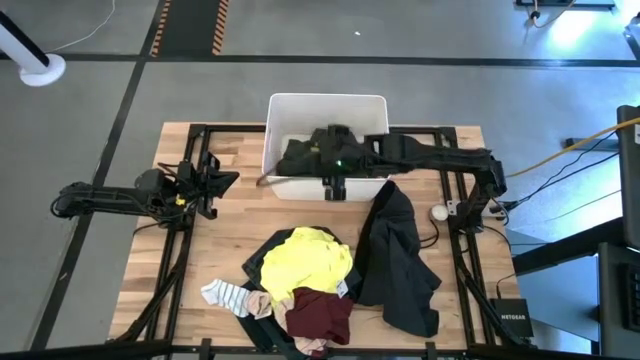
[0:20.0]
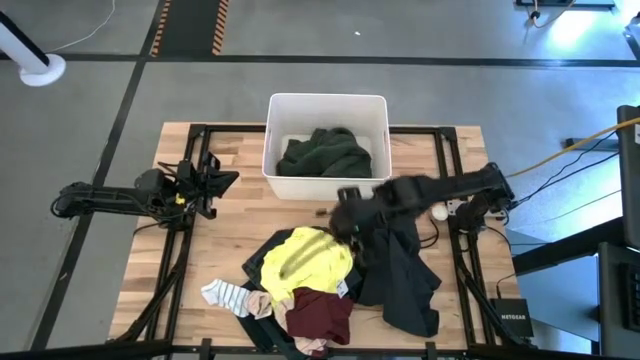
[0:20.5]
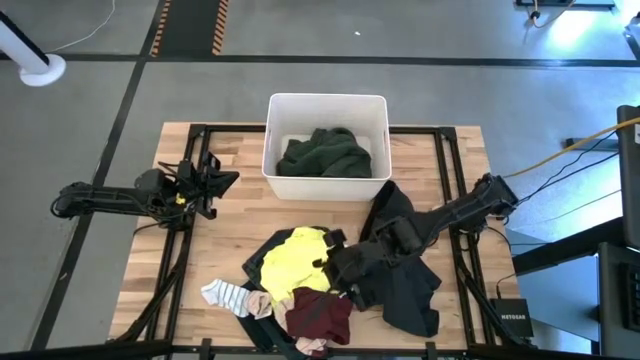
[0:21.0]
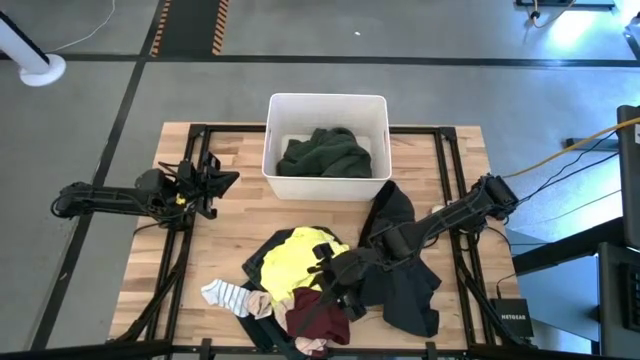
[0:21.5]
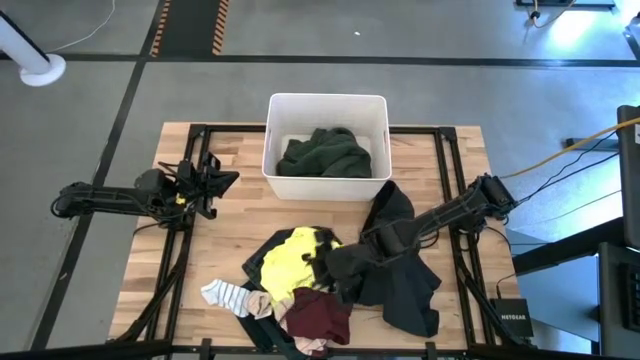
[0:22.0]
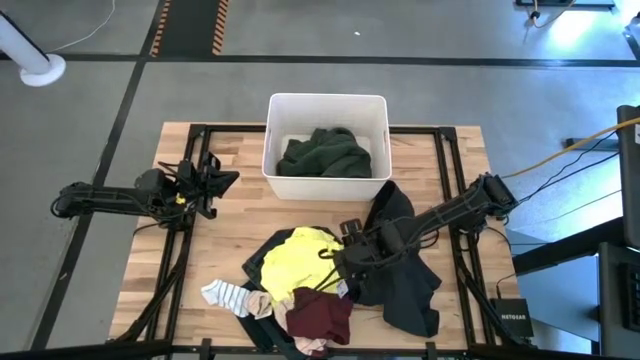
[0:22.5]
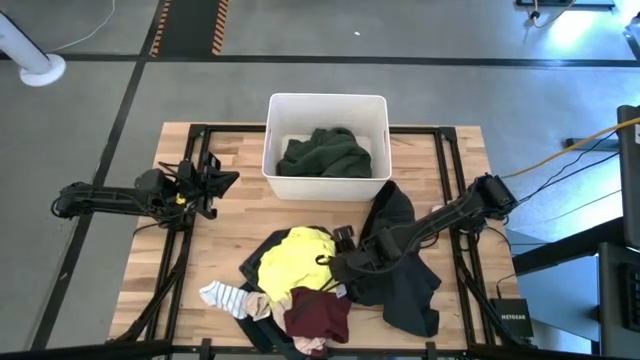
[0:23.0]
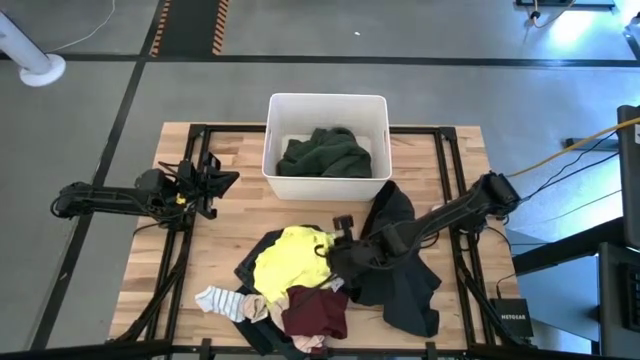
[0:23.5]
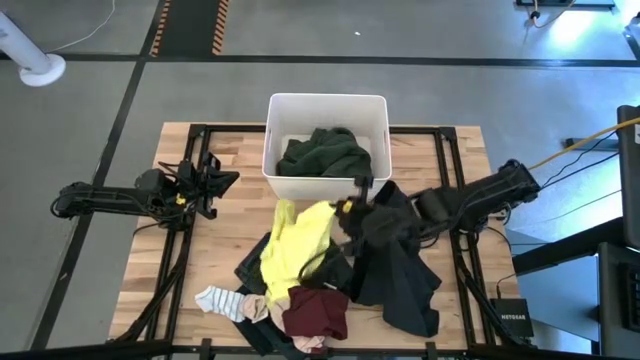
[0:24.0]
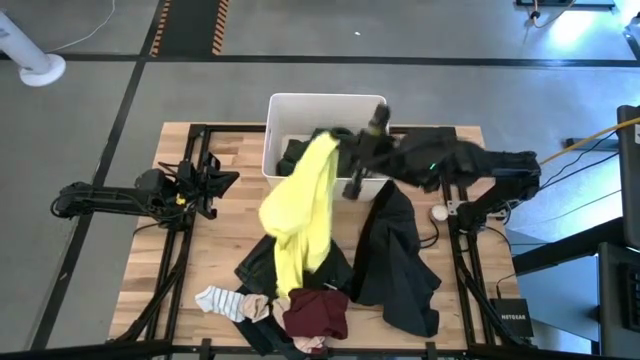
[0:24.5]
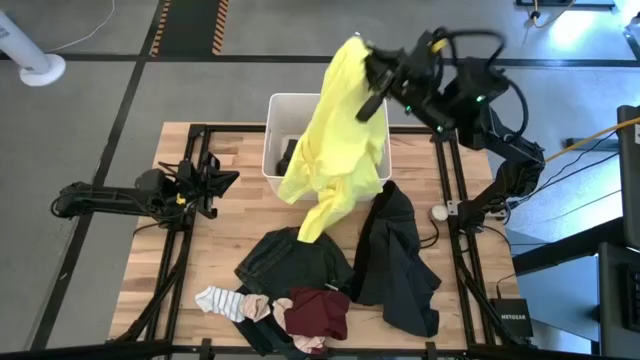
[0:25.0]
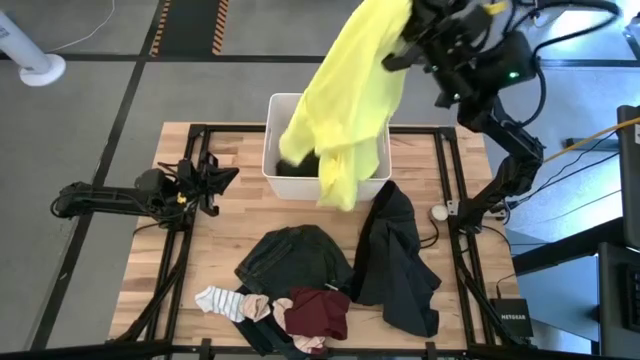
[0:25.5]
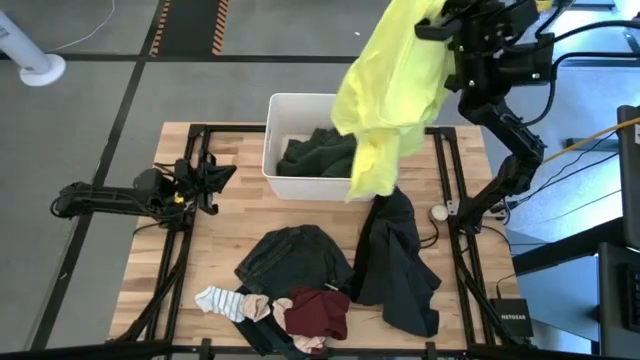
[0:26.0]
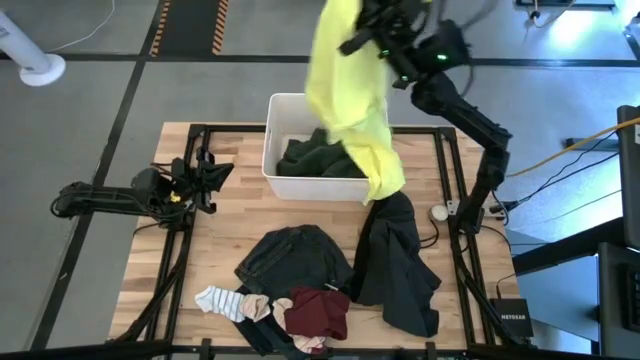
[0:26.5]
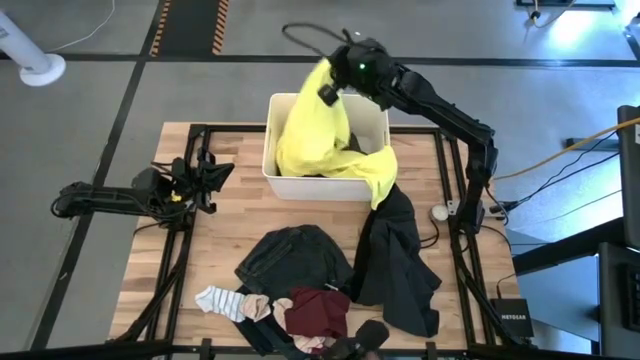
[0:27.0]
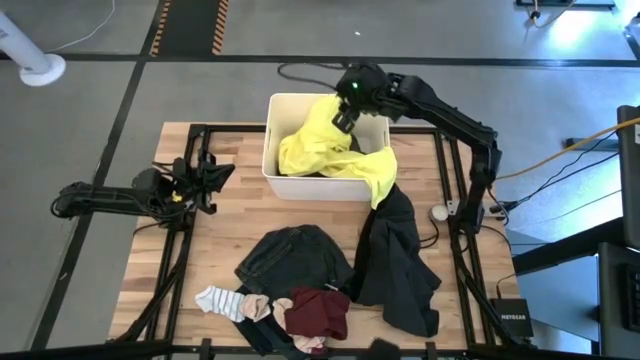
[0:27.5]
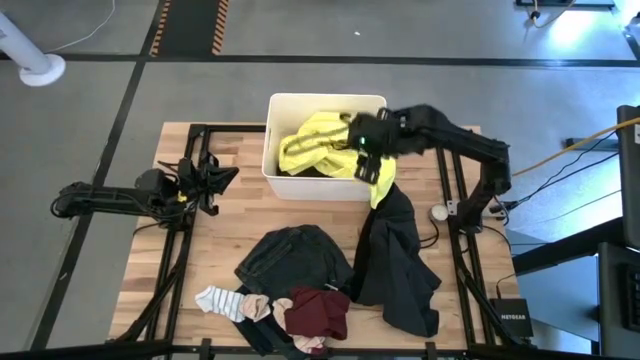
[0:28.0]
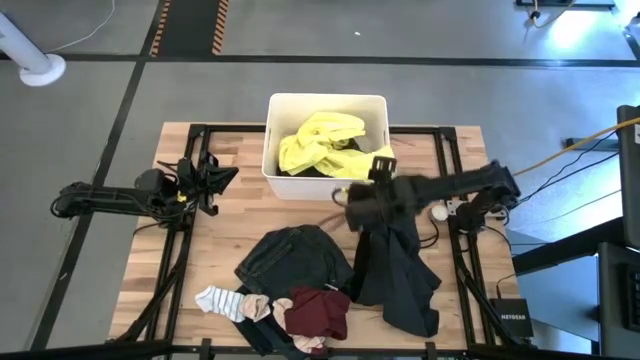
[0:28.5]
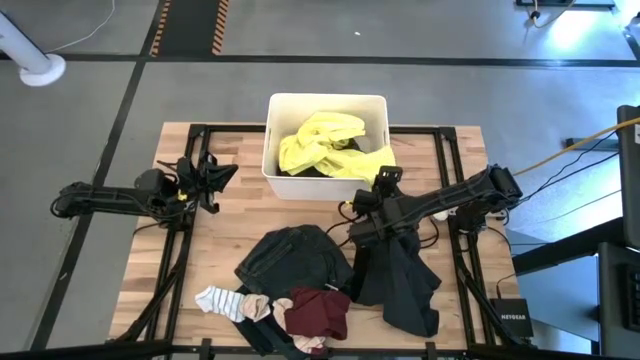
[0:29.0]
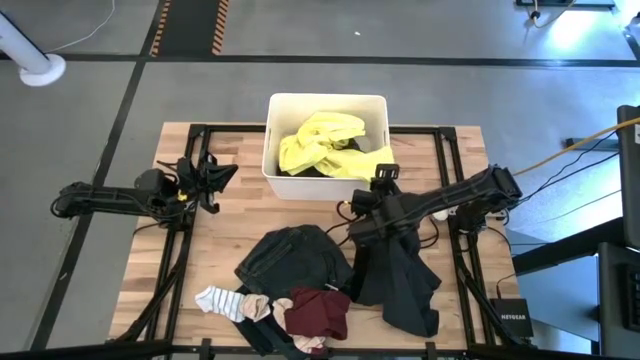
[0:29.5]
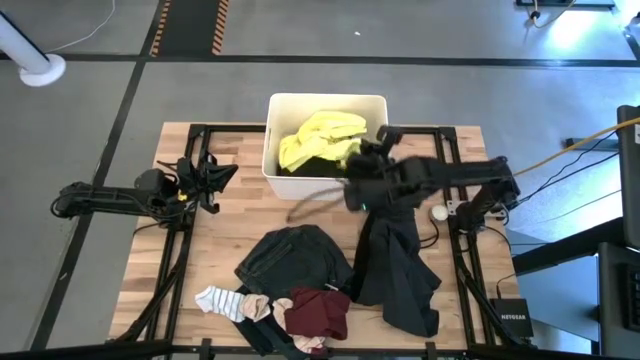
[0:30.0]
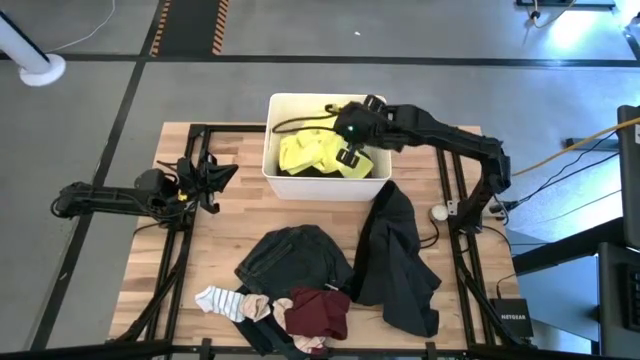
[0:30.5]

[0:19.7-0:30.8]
Task: Sort clothes
Put the yellow shirt into the white bin

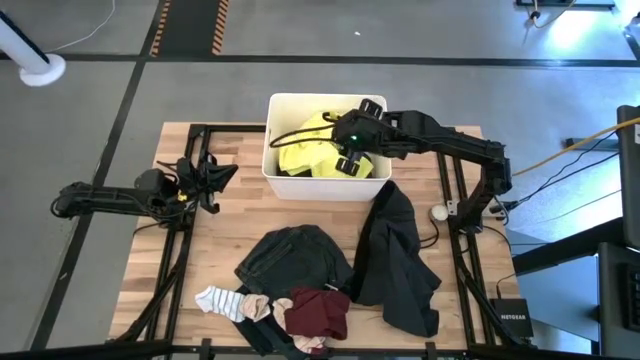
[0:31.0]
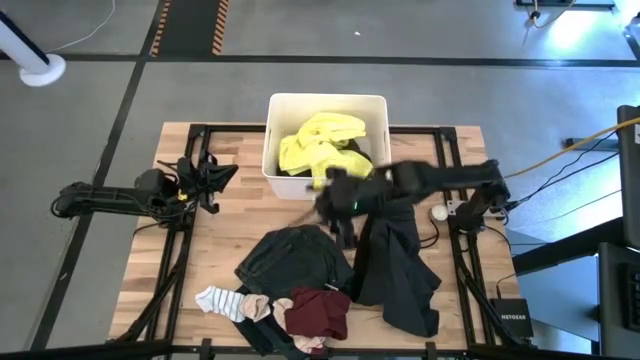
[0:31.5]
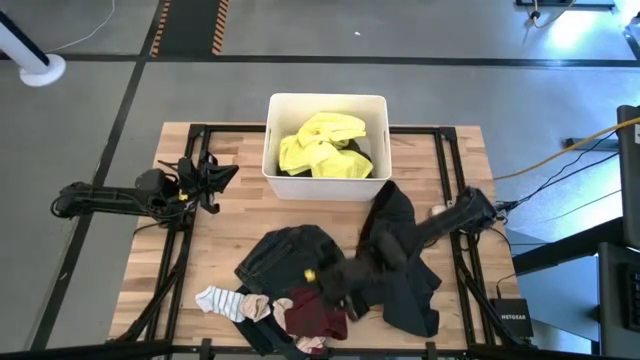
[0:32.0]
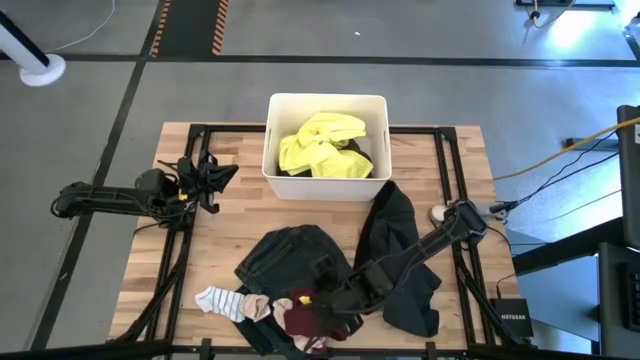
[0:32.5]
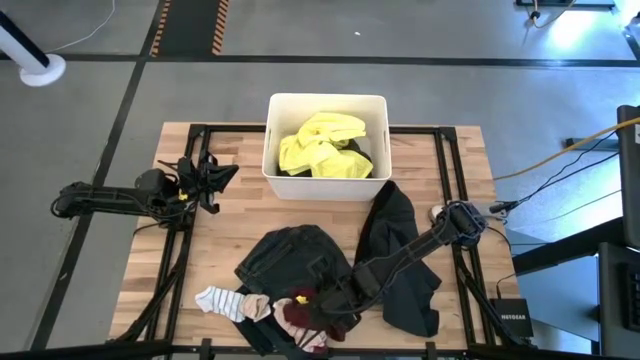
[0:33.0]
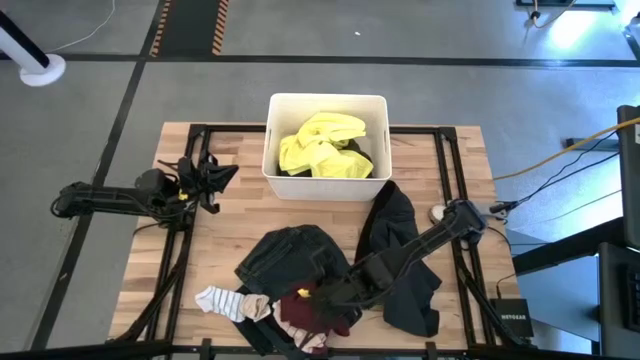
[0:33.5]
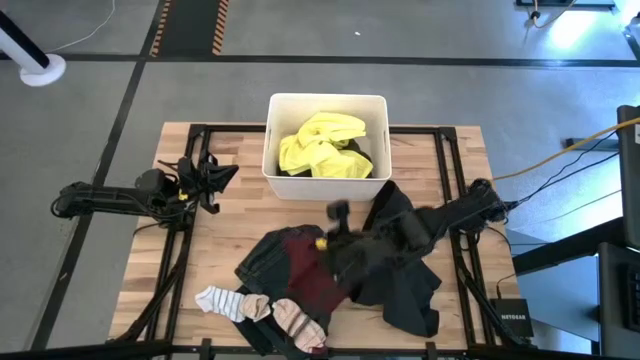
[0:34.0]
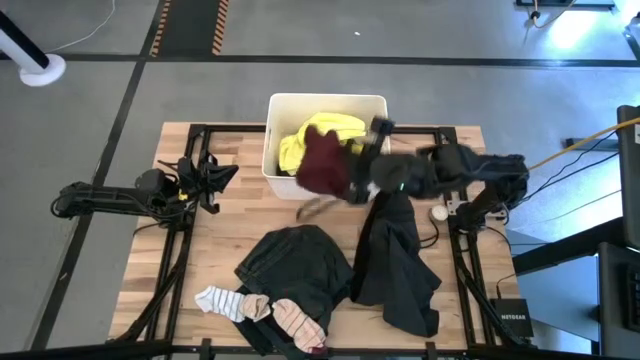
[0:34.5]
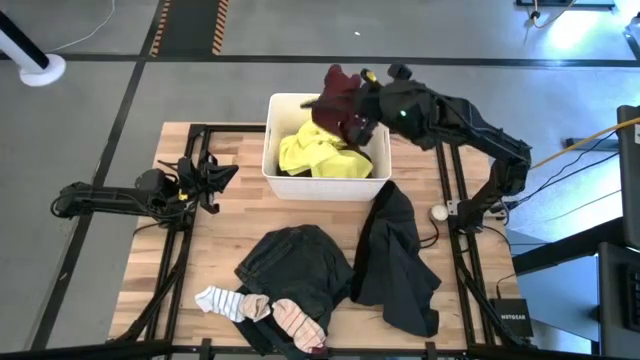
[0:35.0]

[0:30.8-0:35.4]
Put the red underwear into the white bin

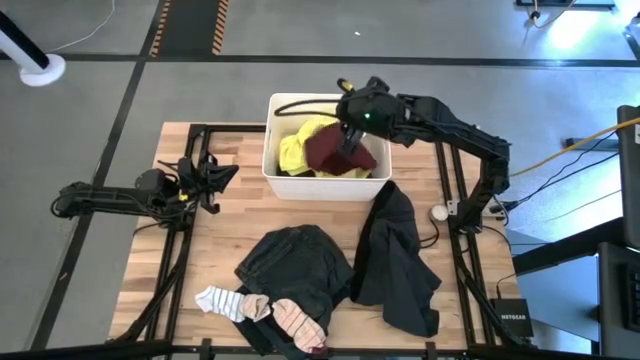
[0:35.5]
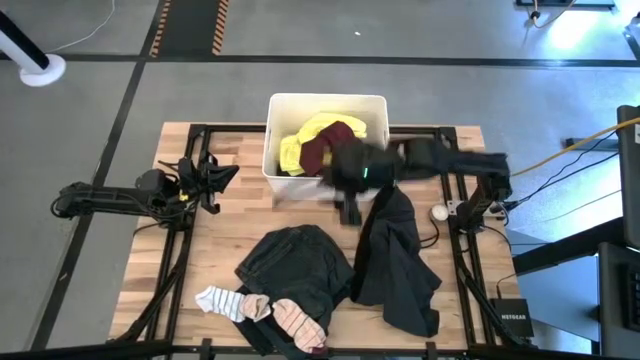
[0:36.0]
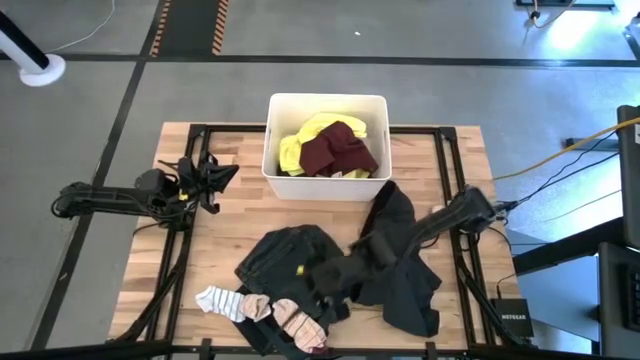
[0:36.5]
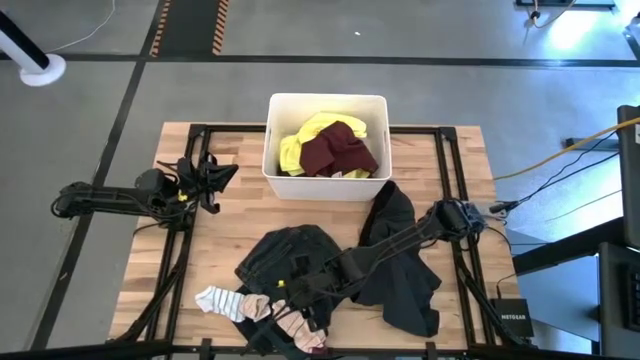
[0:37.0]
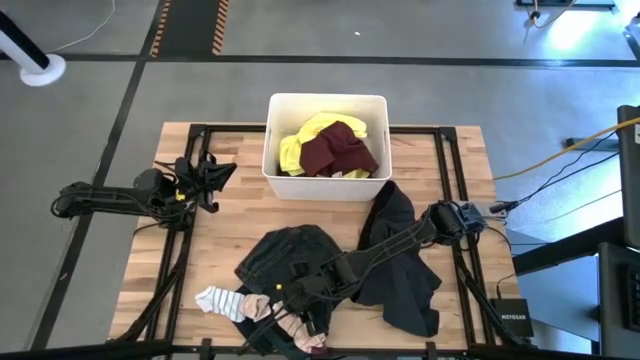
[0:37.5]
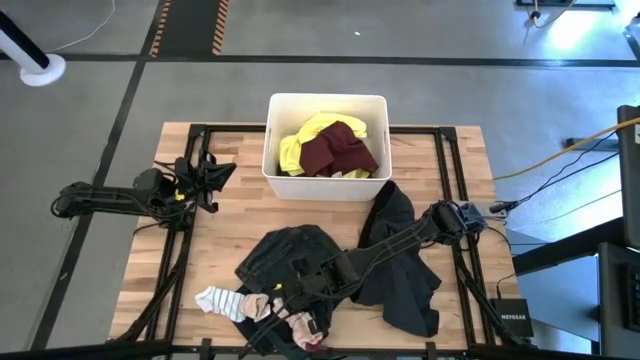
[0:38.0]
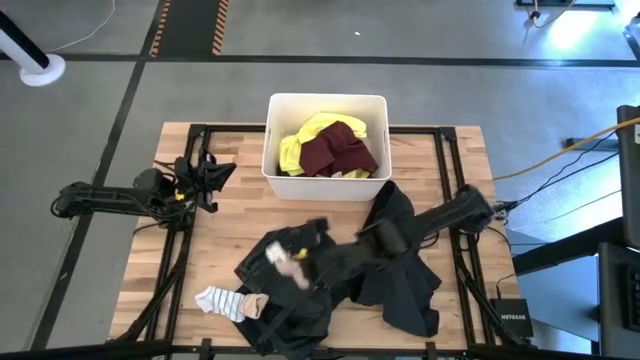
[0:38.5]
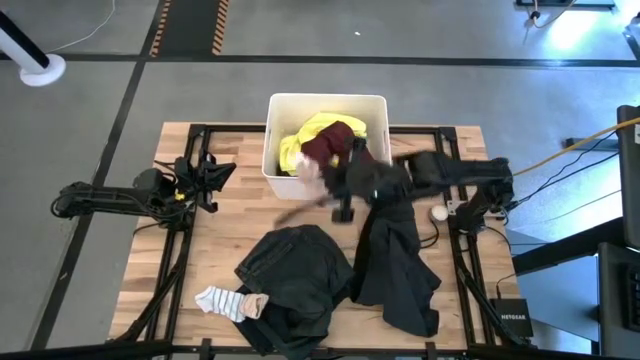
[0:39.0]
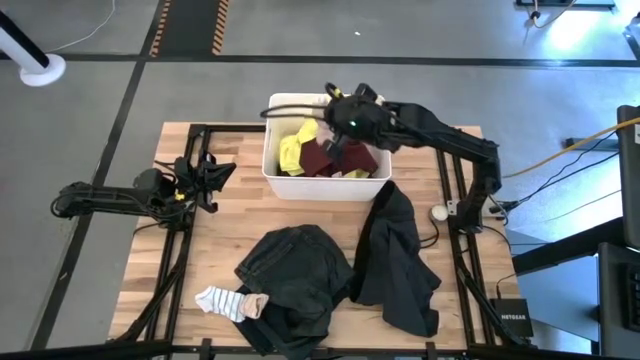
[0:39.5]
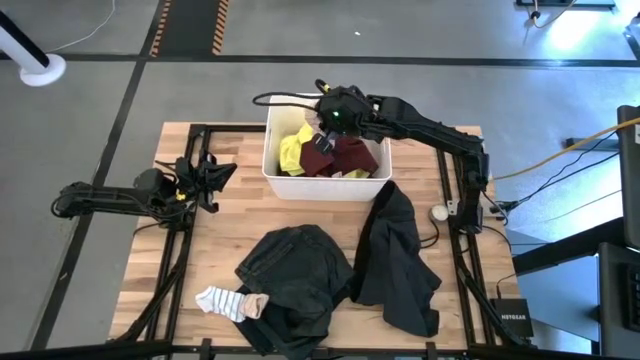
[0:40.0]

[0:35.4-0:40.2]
Put the bottom brown sock into the white bin

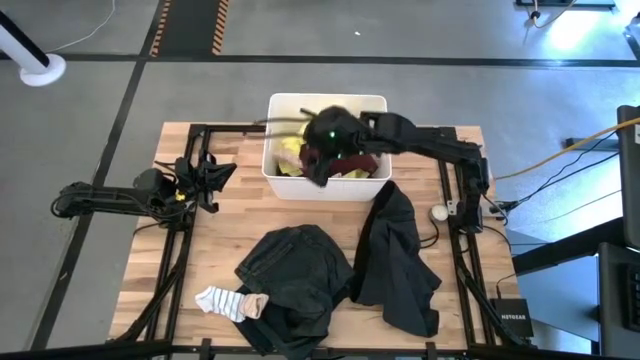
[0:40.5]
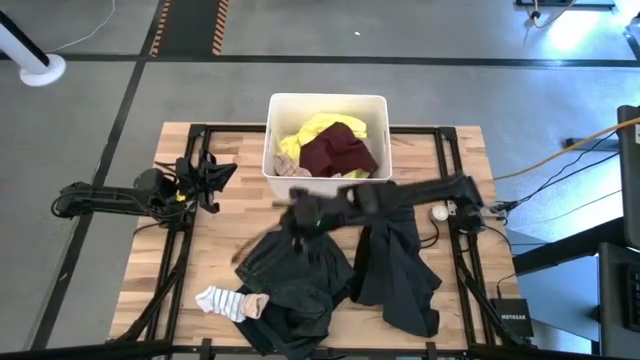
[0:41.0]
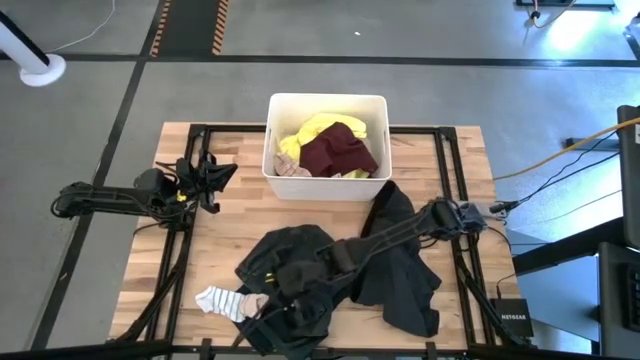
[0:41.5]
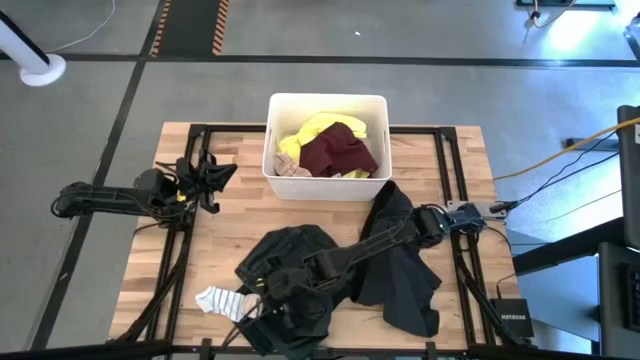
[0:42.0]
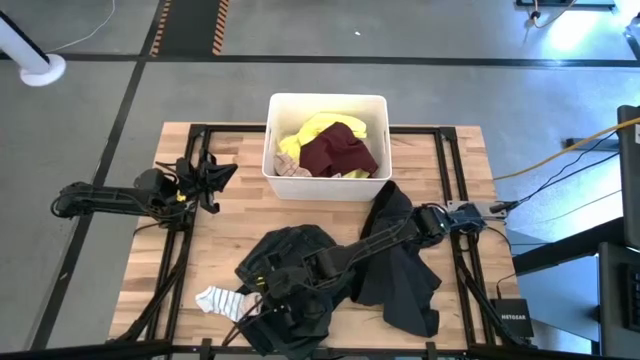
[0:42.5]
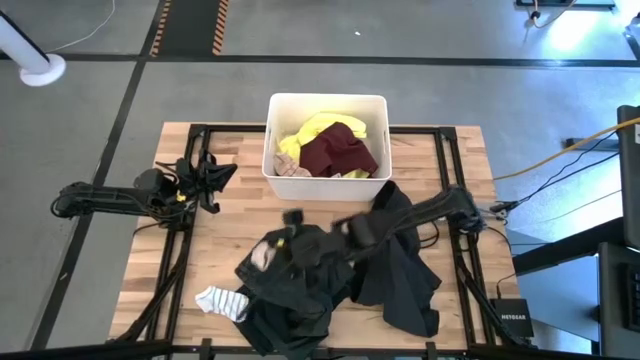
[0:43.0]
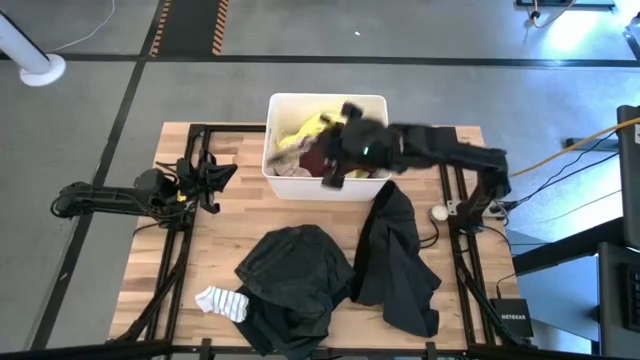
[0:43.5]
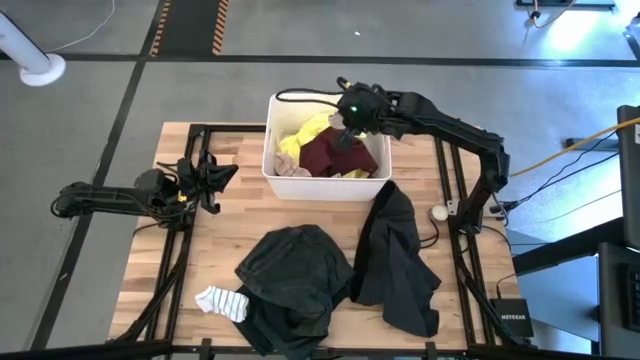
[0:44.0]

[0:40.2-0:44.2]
Put the brown sock into the white bin
